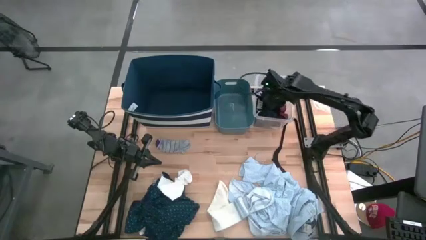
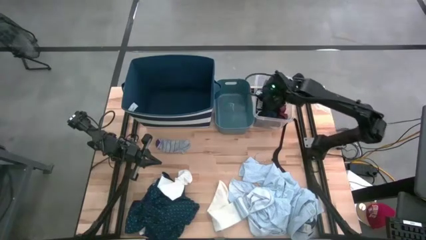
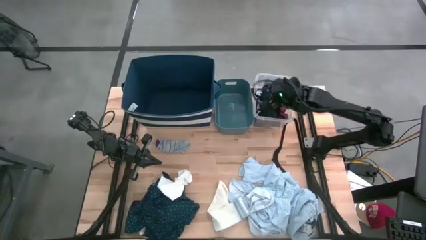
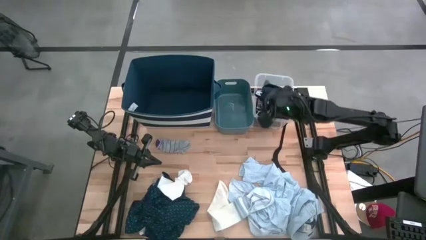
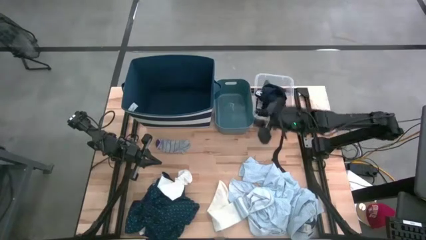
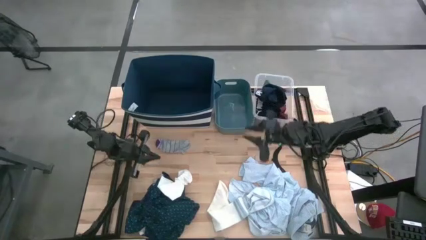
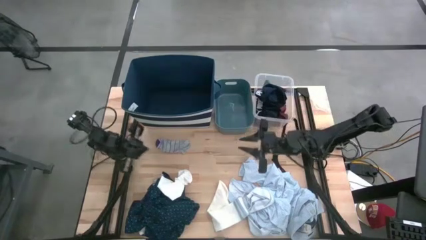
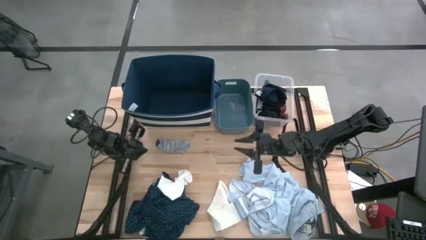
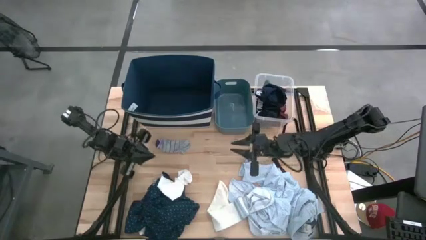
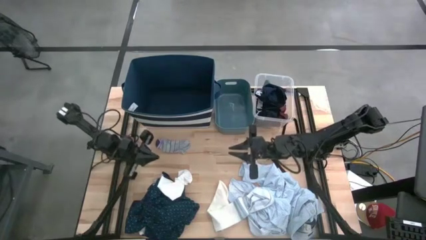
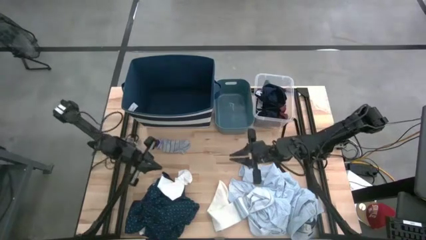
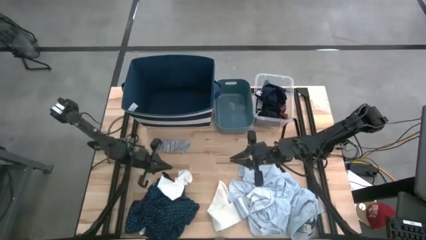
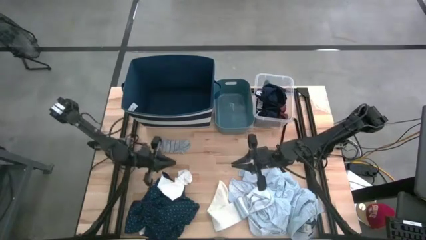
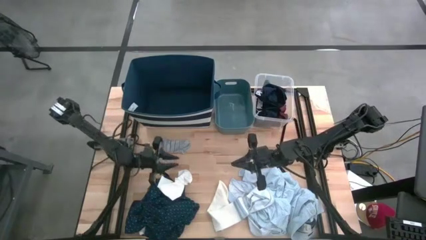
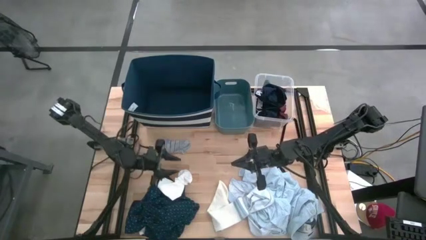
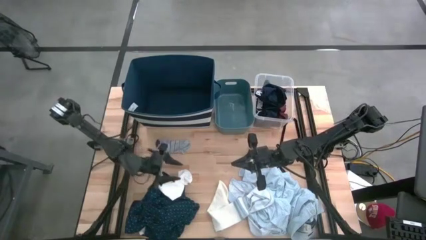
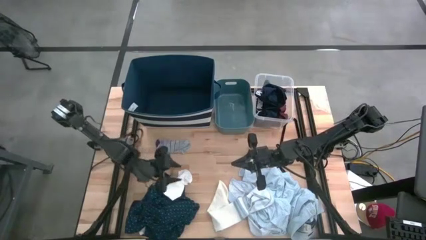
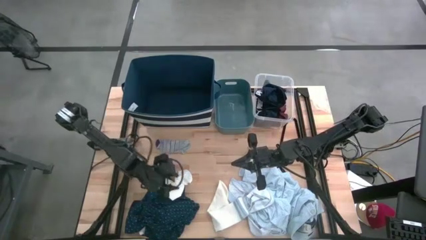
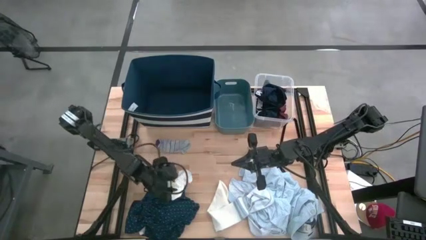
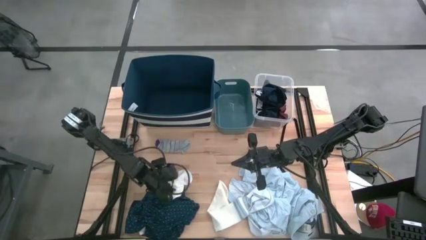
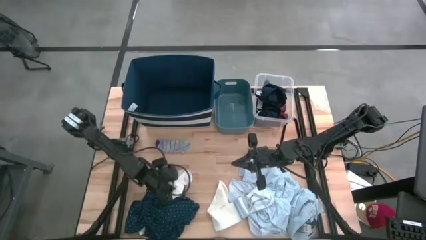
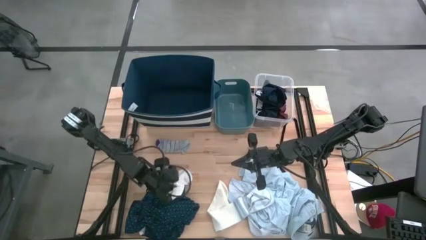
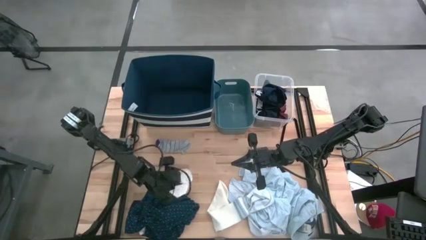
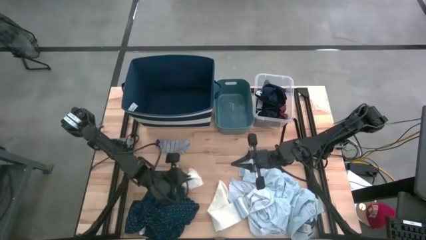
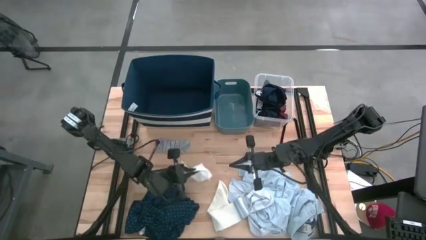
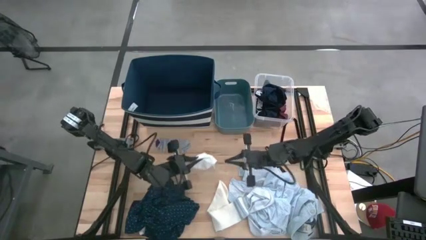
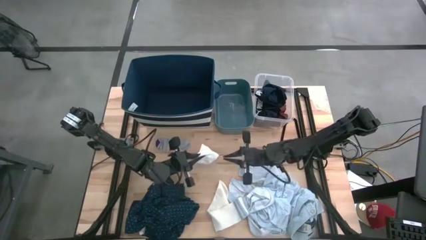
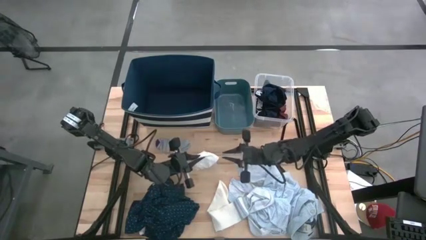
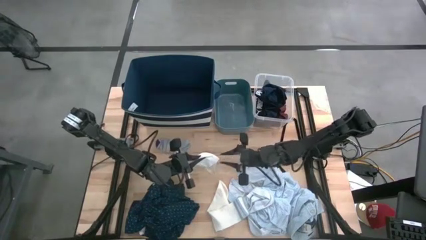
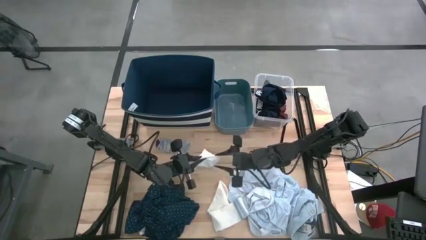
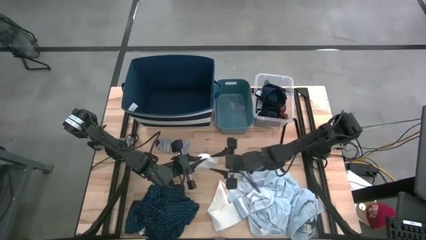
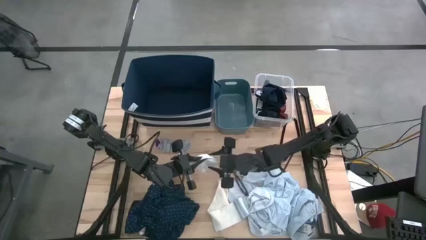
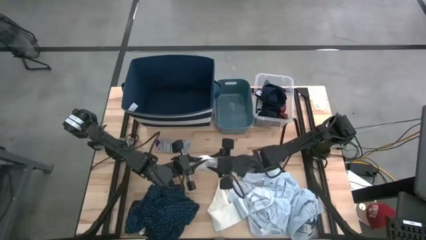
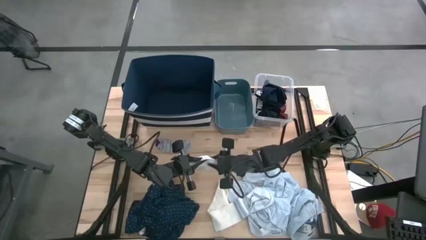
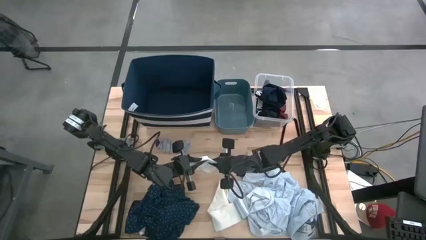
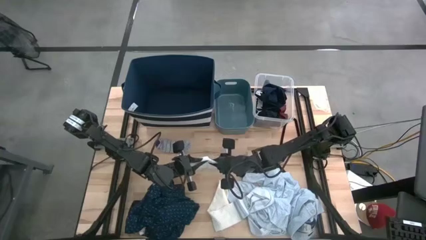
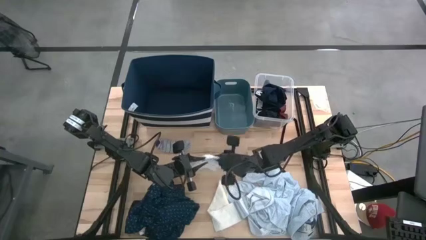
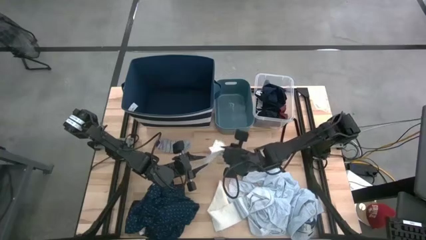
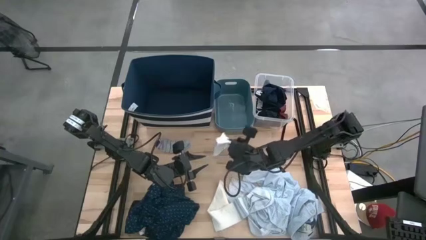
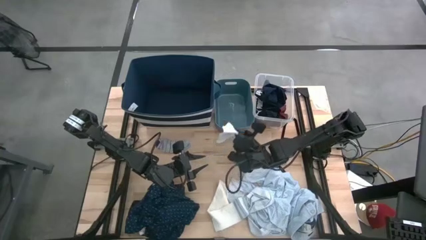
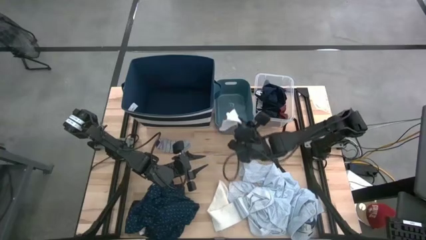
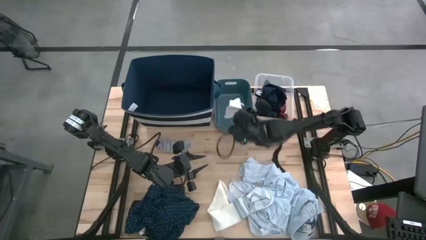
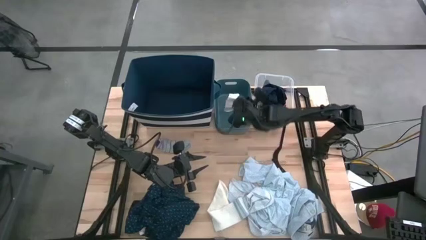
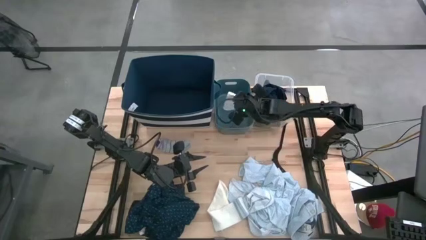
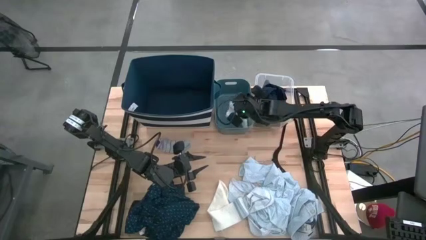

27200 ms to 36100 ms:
Task: Pick & Place Cloths
Put the top white sock into the green bin

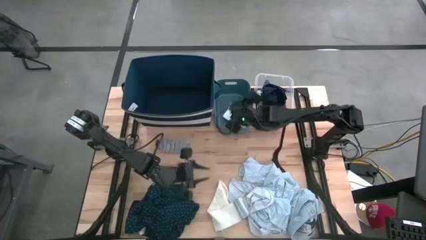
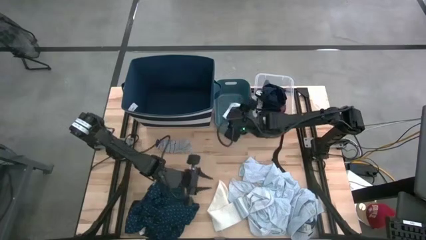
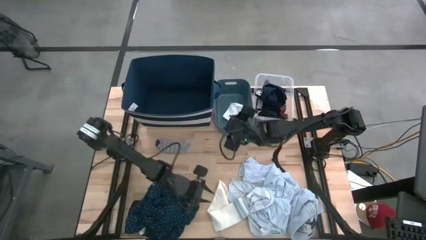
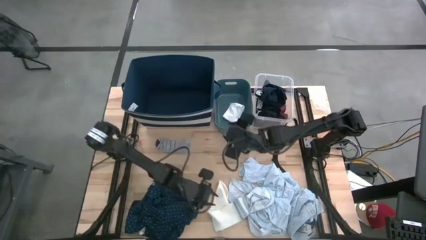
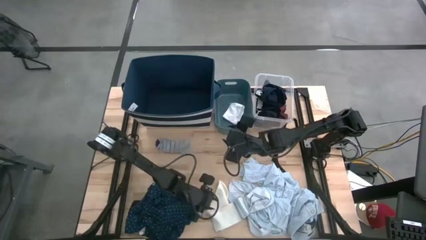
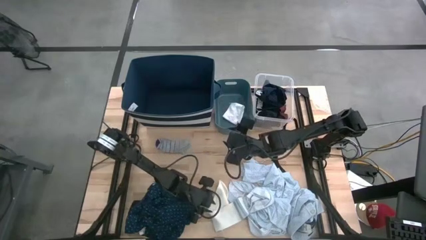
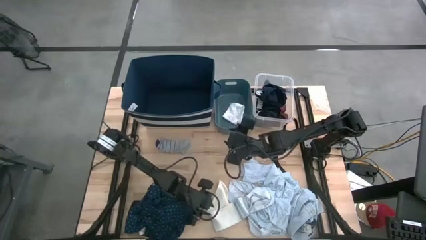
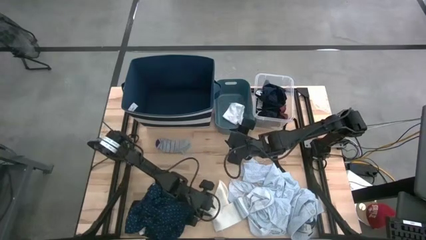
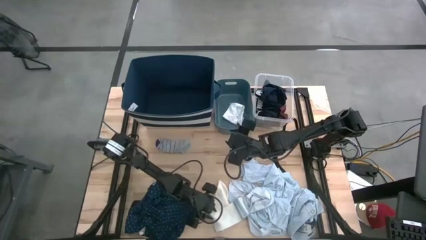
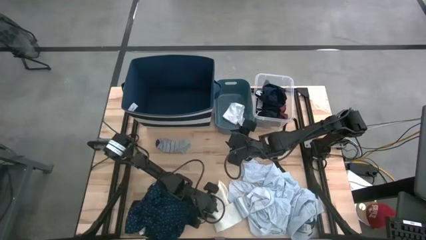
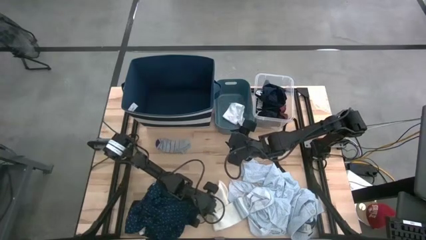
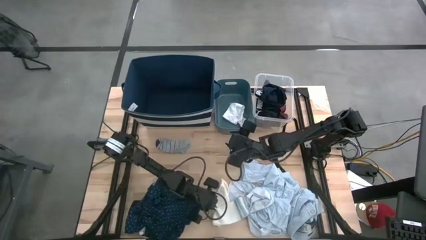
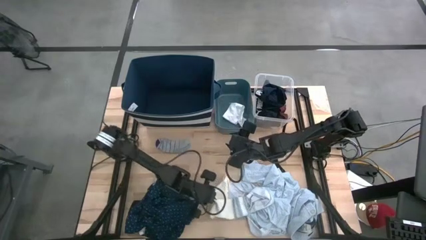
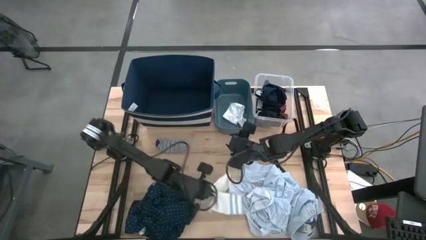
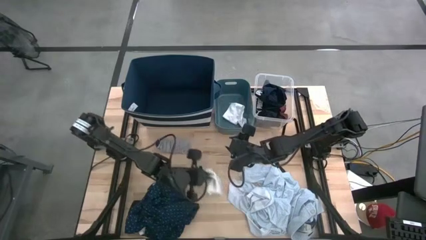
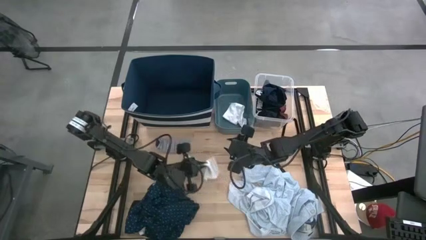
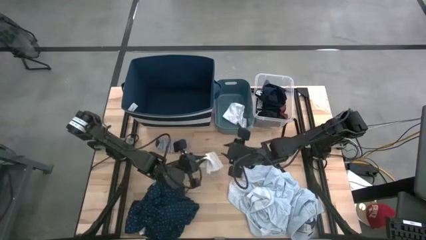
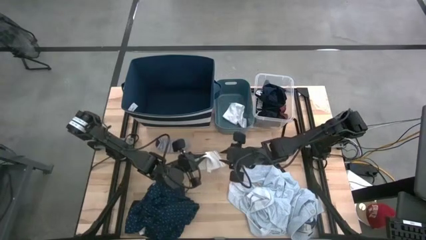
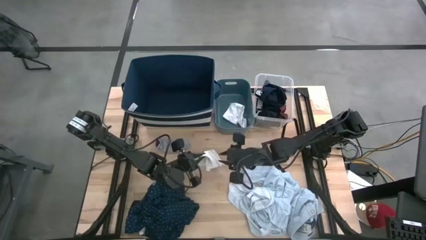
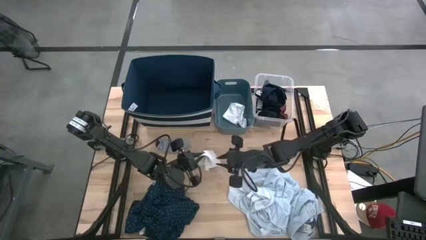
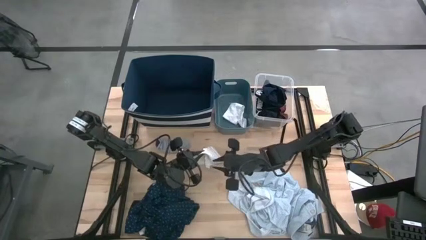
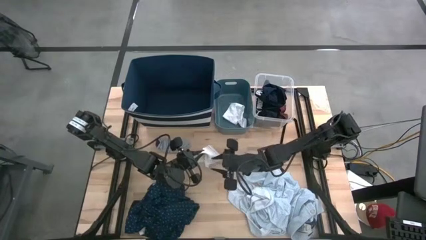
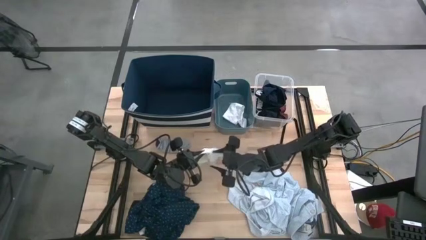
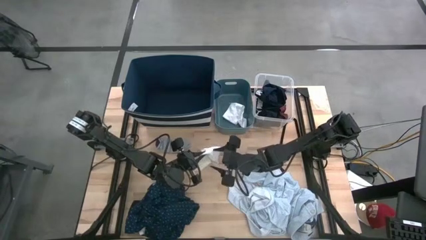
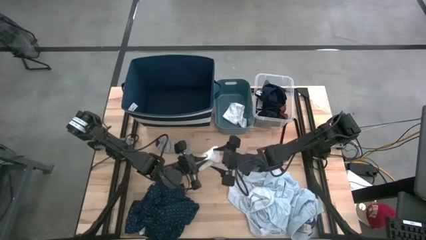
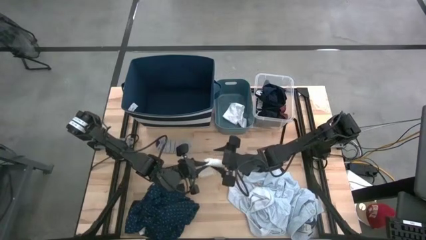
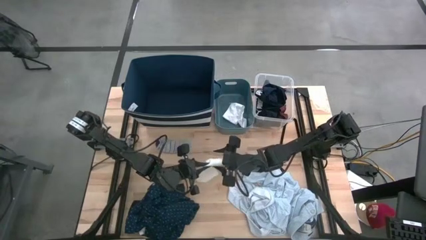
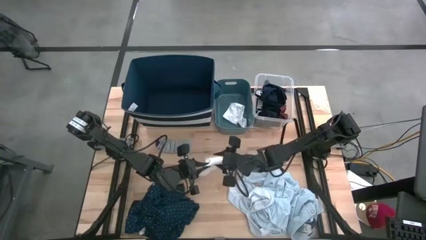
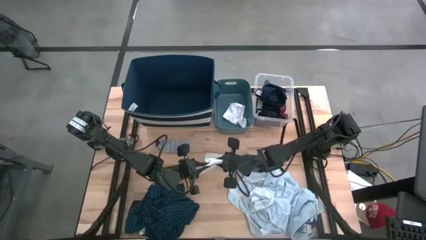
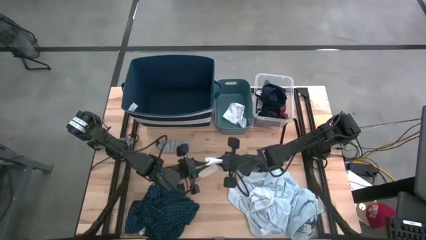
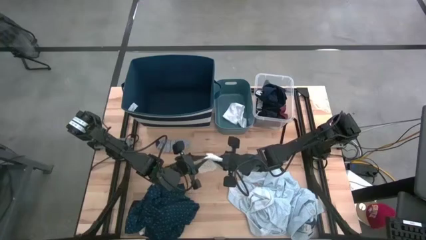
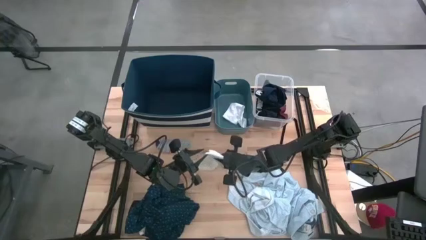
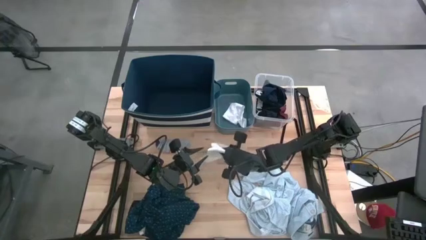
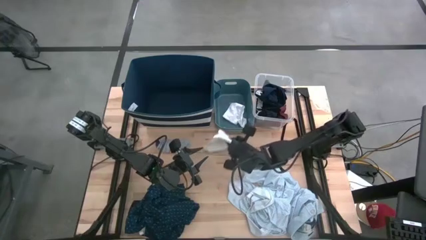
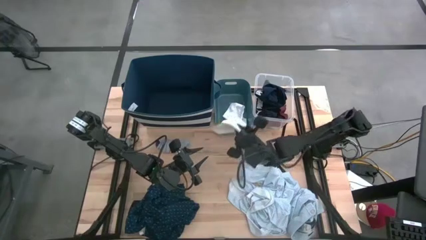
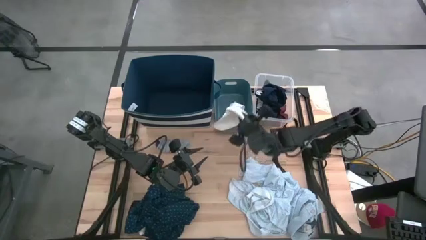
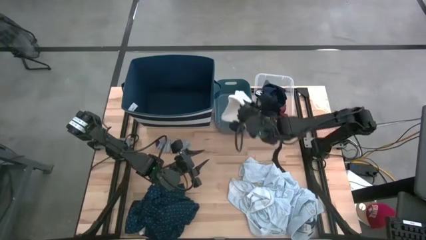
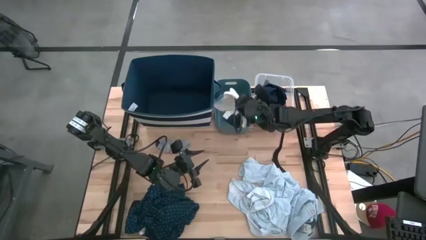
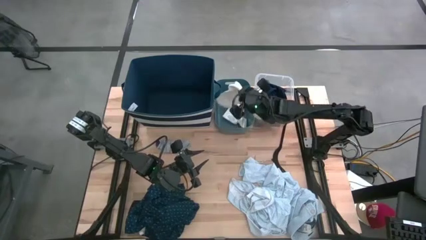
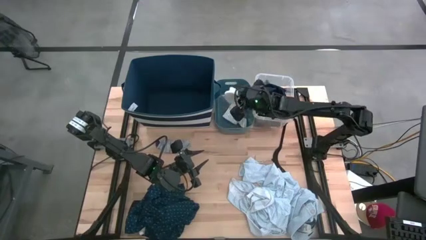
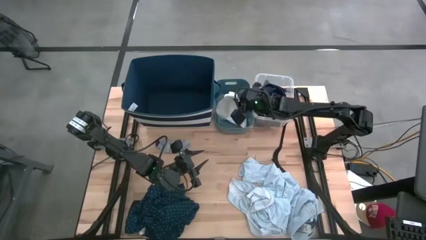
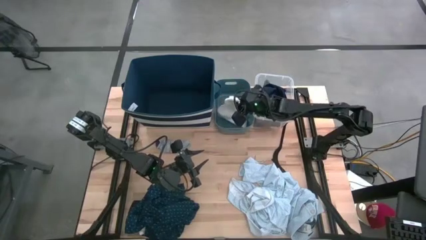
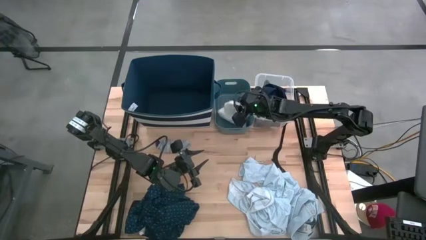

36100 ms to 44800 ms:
Put the white sock into the green bin
